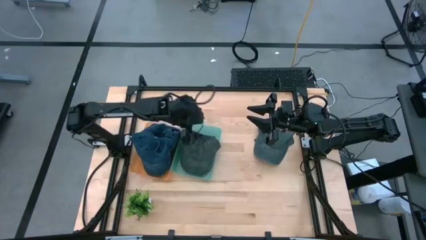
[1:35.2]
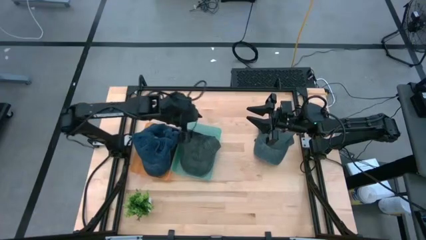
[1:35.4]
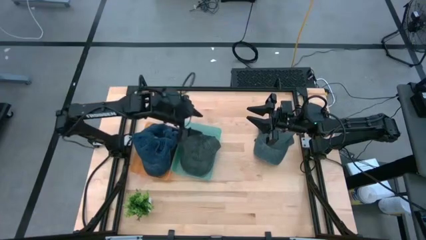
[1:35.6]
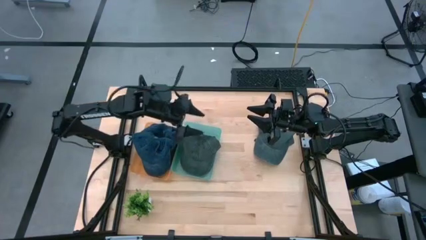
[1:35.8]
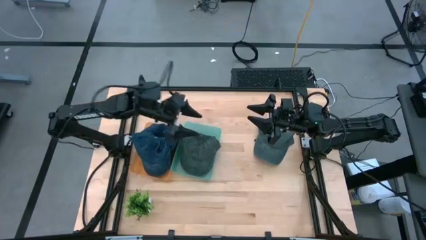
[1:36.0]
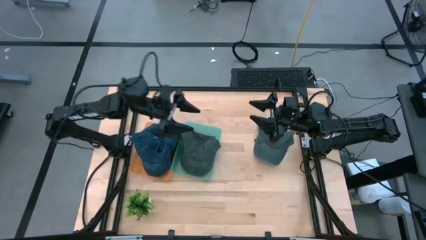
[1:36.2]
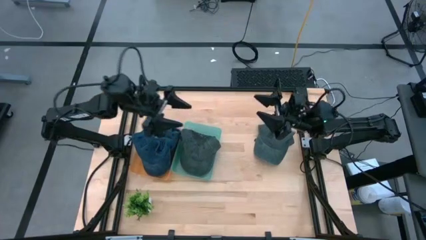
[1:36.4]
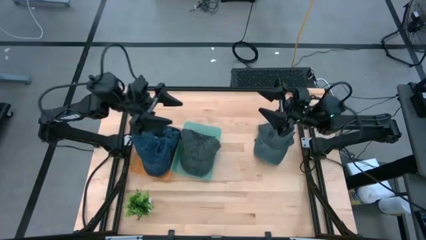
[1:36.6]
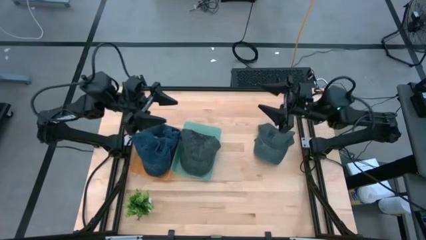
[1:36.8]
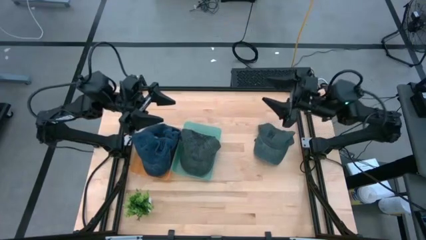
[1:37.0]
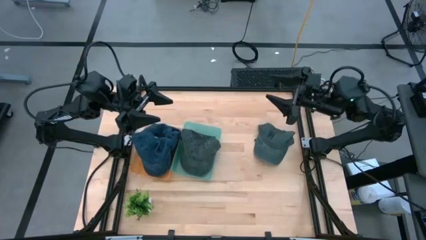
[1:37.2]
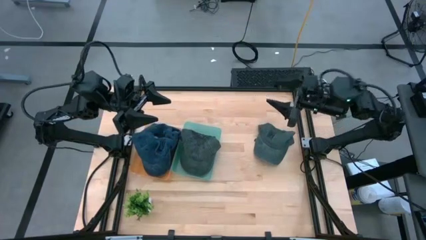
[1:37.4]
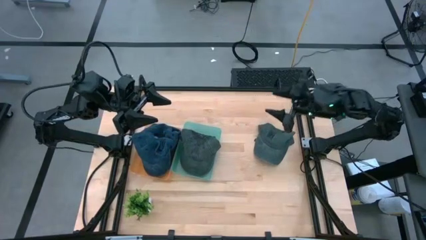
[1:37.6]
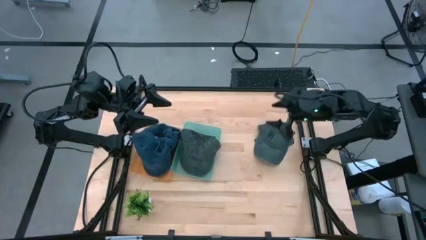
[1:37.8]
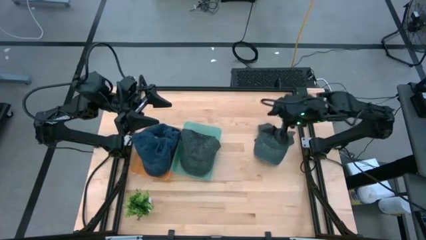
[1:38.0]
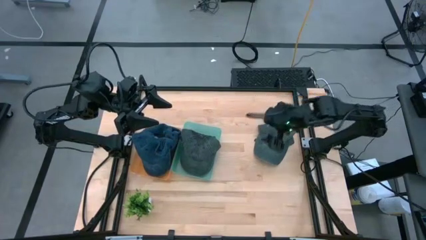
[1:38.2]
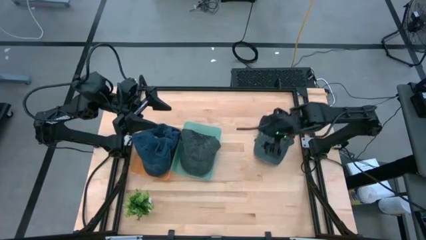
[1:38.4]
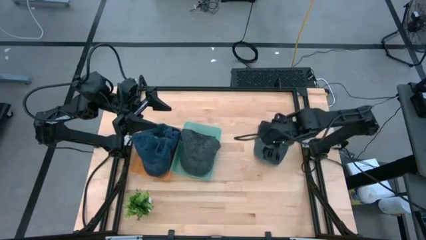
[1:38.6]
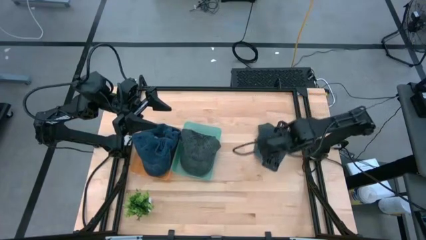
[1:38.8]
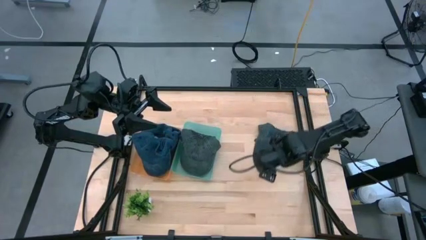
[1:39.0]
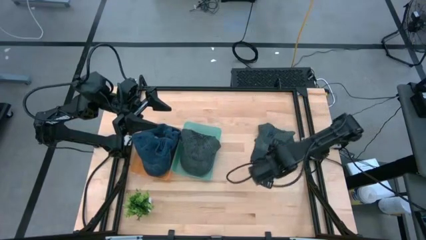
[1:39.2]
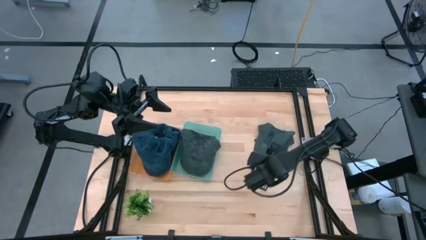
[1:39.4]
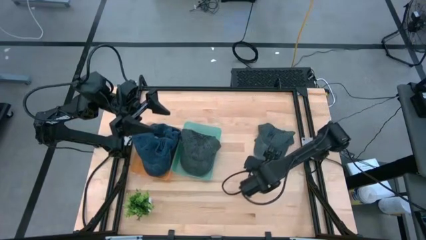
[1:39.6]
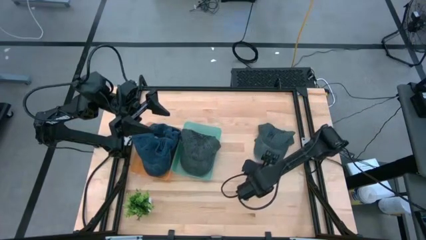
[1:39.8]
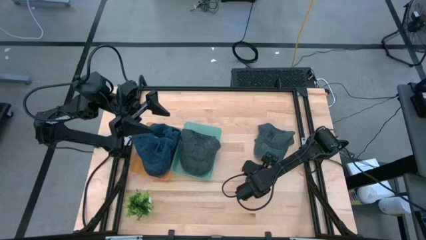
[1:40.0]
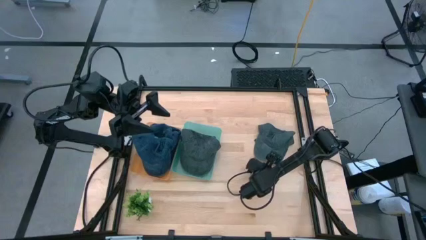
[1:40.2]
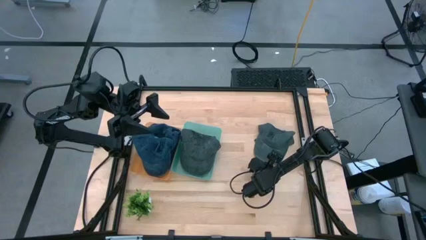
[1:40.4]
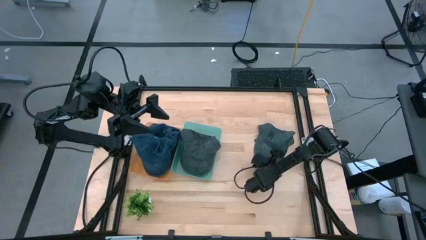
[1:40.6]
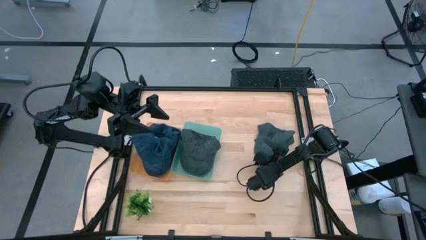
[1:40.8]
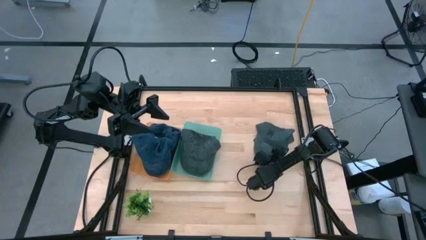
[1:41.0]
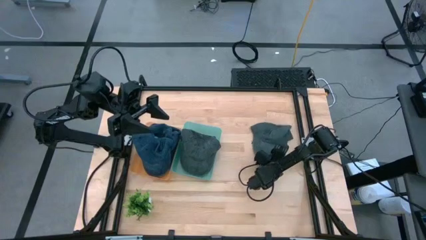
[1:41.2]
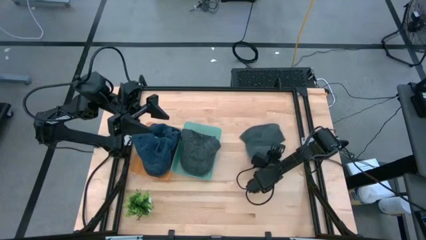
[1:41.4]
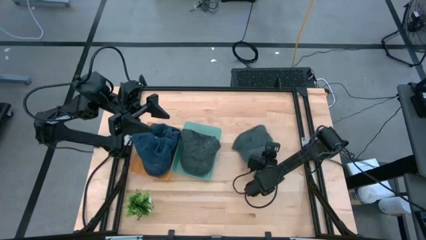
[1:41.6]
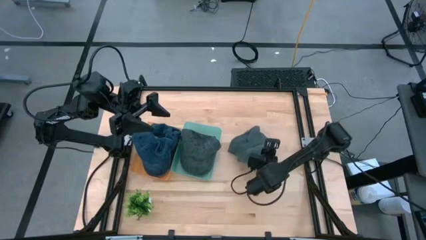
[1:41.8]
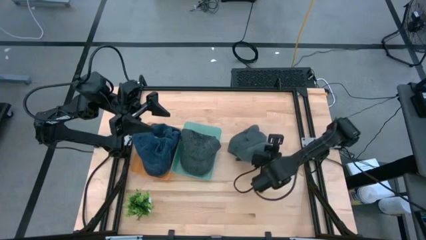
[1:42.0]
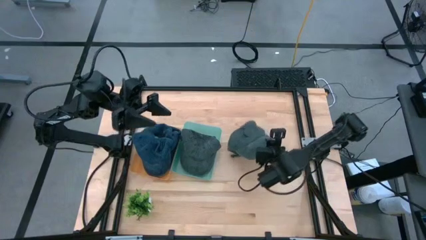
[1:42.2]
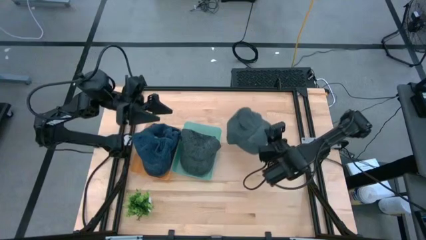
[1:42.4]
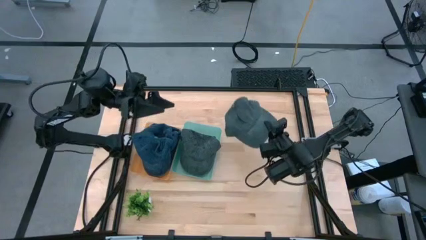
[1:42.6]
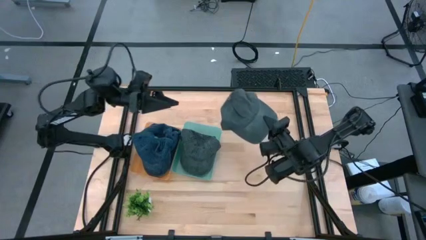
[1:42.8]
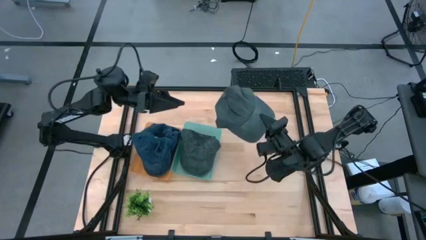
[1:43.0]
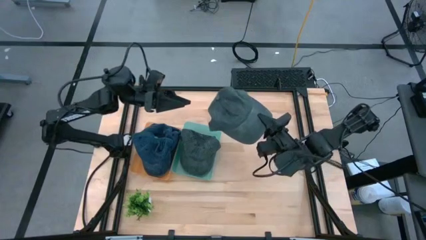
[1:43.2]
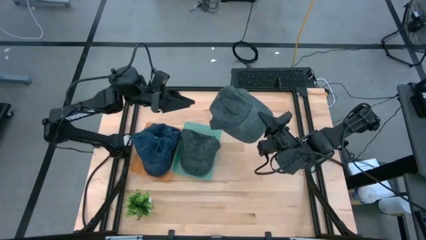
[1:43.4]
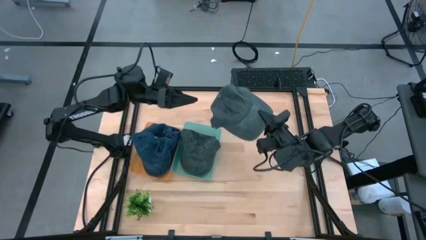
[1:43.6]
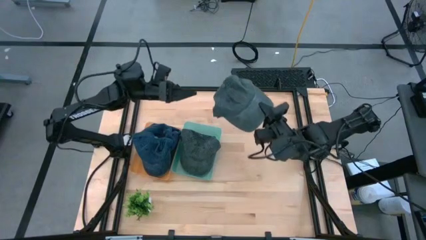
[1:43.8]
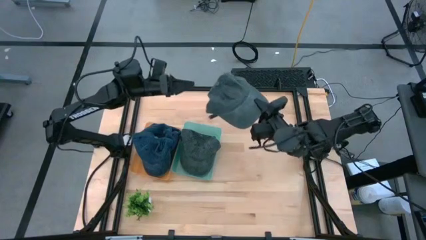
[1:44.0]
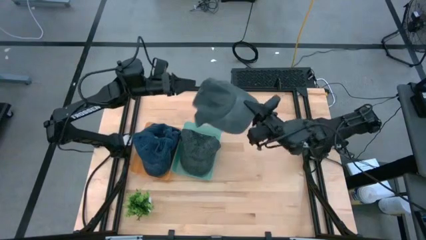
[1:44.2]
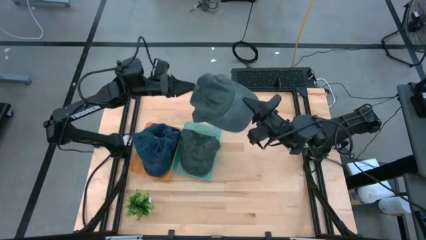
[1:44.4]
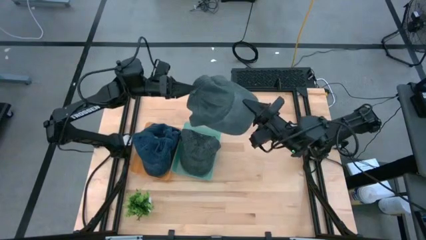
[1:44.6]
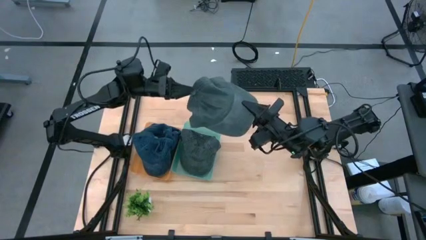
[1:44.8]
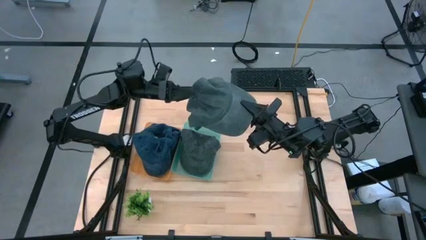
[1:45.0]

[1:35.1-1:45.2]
Task: Pick & Place hat
Put the black cap into the green bin

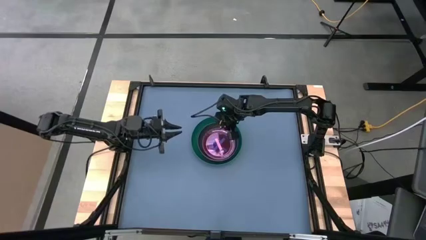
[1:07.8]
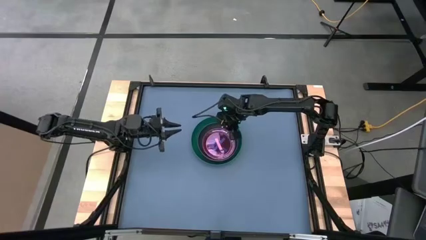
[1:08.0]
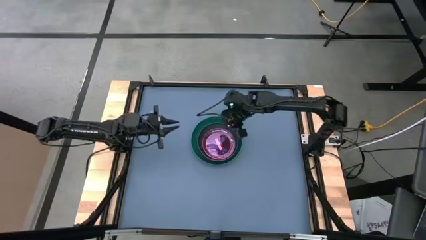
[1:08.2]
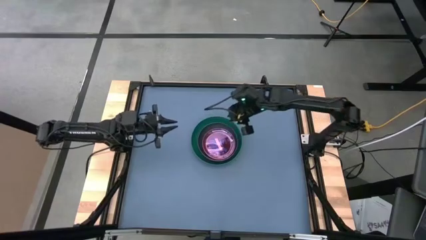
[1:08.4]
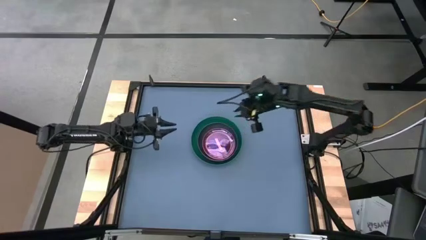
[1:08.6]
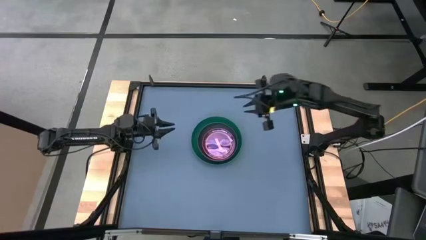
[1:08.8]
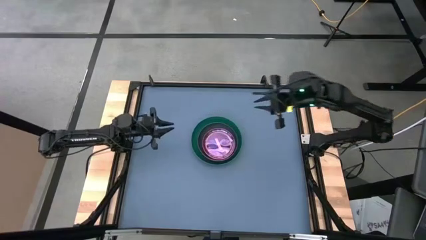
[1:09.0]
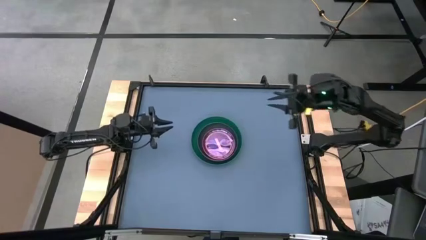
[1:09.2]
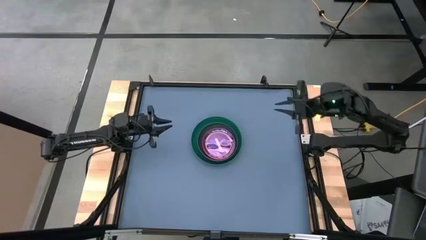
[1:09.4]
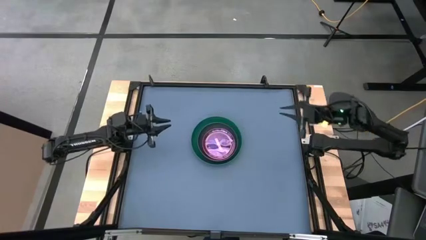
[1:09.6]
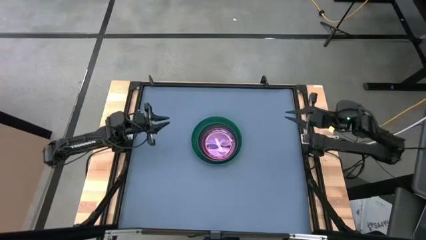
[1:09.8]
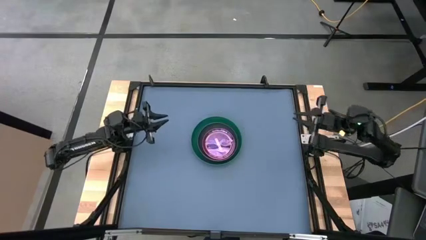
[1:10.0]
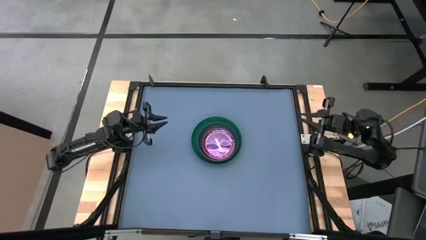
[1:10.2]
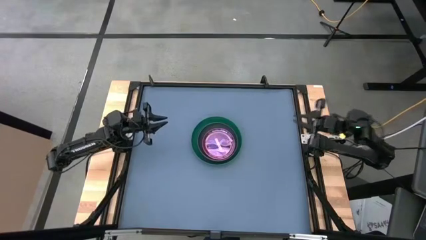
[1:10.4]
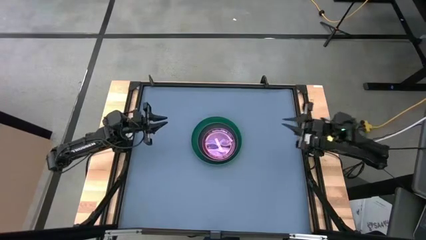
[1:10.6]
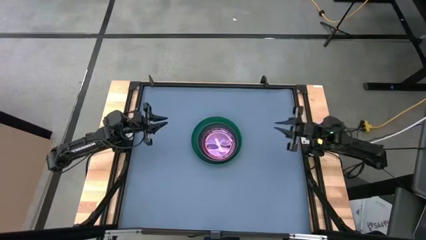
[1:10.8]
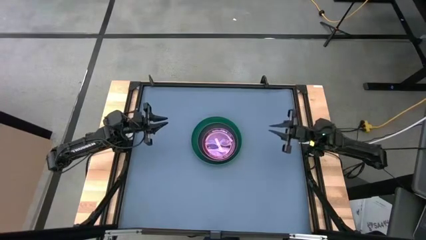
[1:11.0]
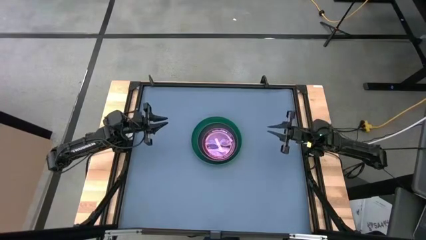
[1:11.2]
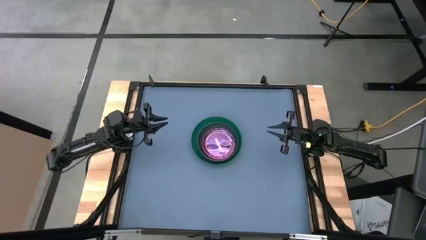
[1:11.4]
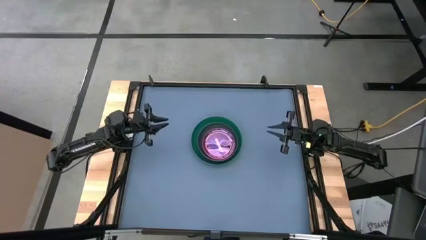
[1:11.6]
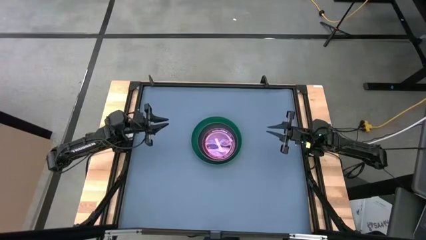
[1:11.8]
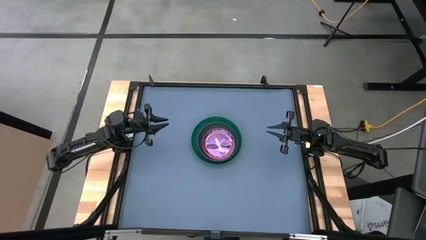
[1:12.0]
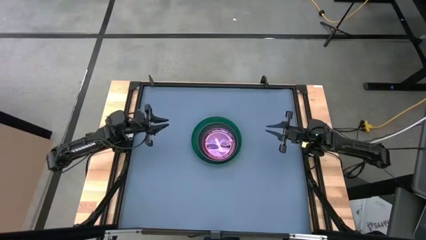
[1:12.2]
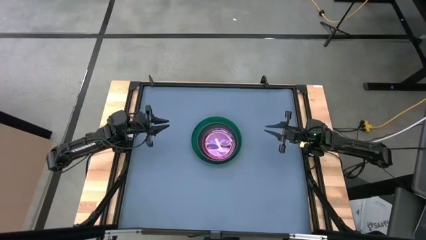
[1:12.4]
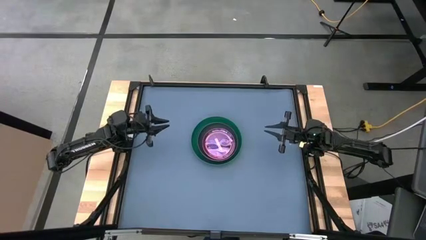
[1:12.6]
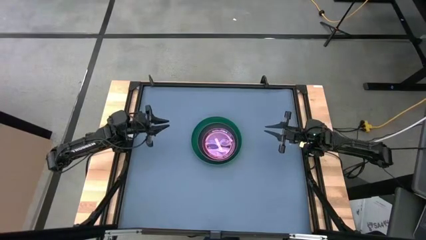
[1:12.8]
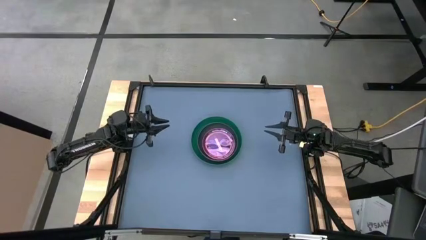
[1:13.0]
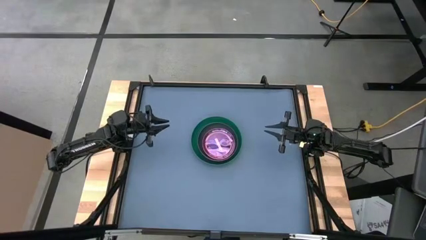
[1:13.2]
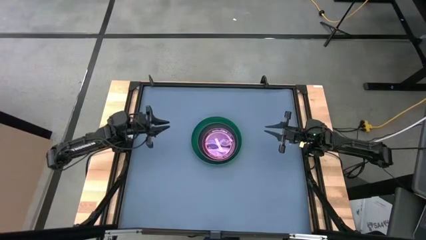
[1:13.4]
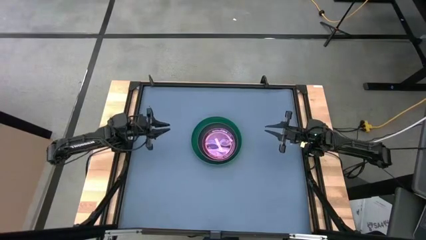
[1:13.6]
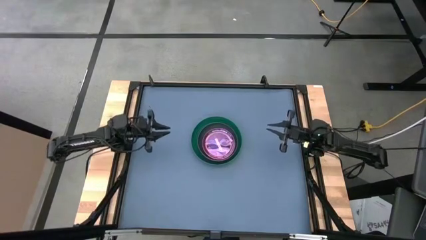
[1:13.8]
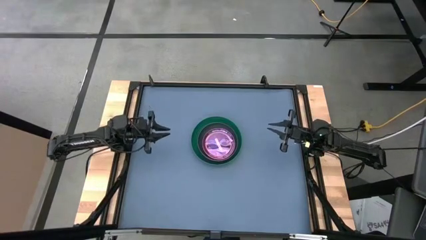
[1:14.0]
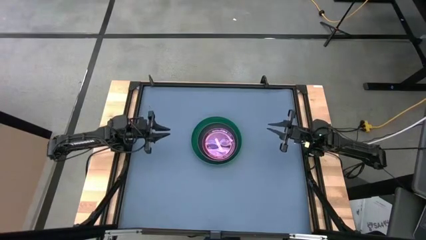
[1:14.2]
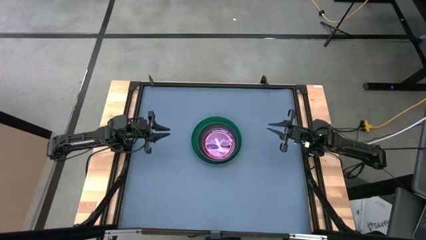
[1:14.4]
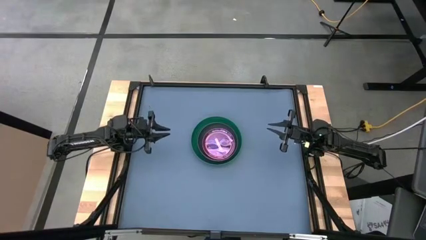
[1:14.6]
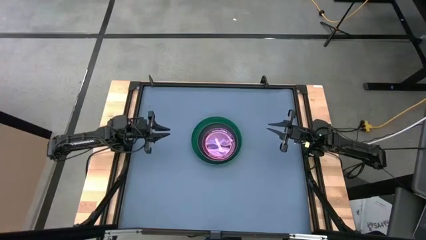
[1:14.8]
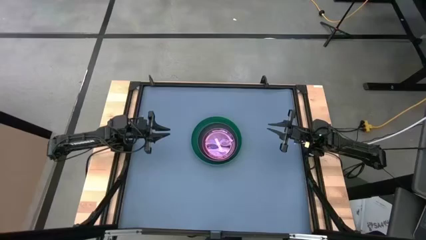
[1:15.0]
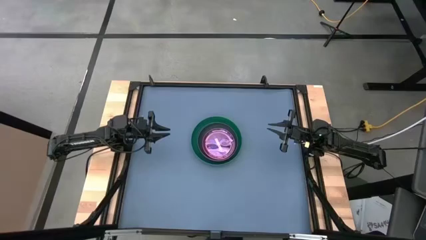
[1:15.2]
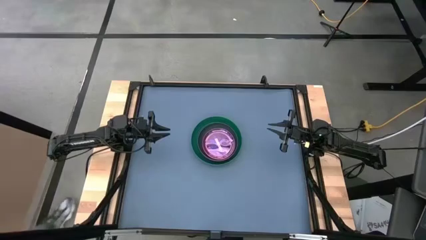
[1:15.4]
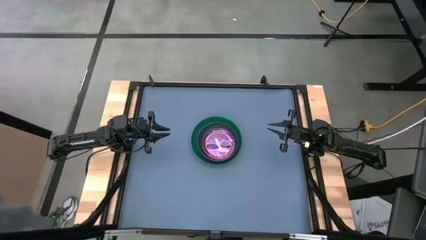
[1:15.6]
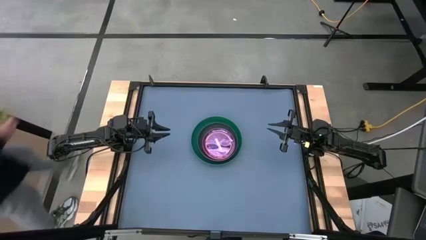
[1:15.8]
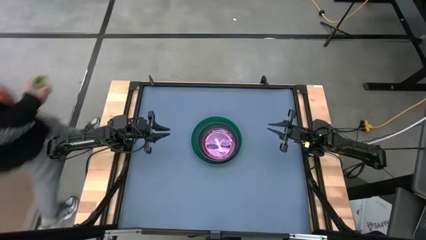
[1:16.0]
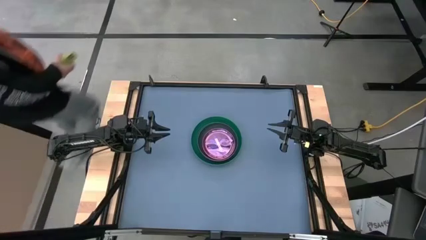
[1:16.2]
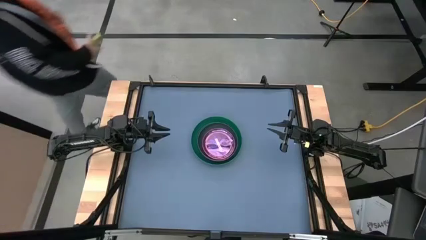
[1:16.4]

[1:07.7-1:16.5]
Task: Stack plastic plates
Return to Home Position
